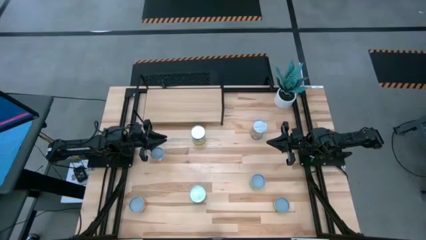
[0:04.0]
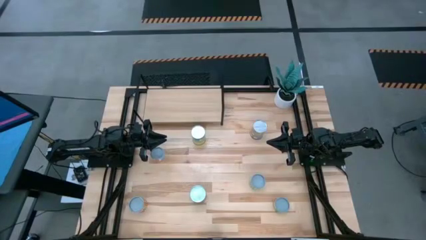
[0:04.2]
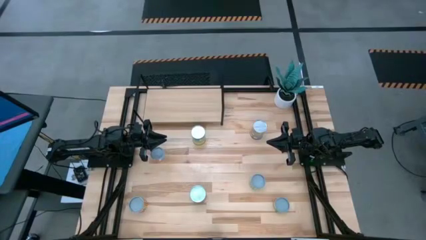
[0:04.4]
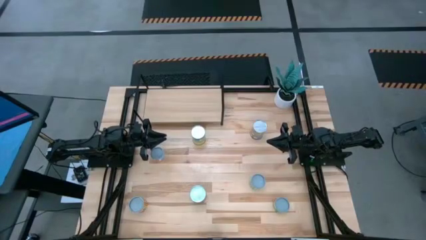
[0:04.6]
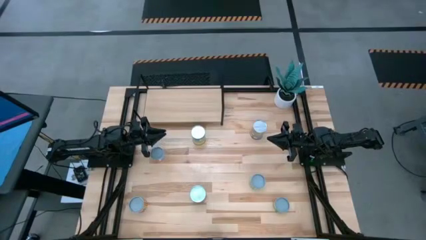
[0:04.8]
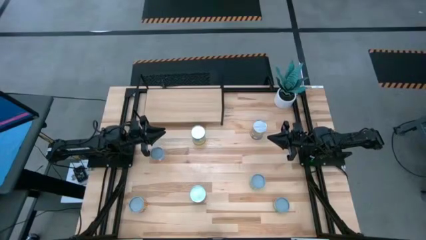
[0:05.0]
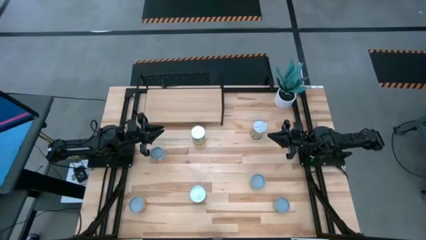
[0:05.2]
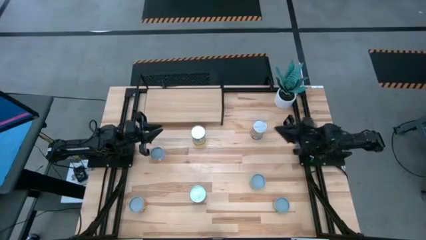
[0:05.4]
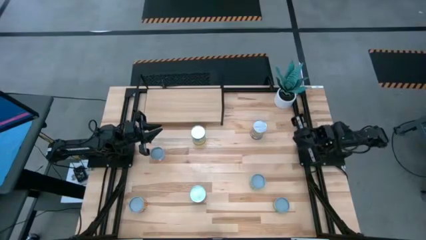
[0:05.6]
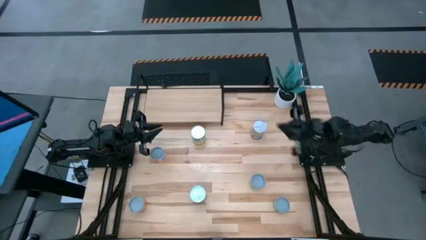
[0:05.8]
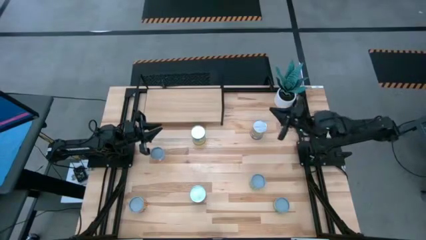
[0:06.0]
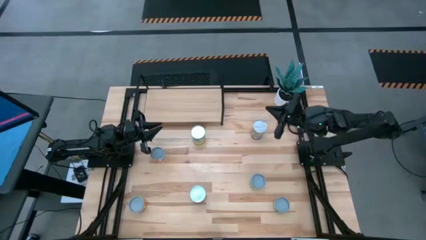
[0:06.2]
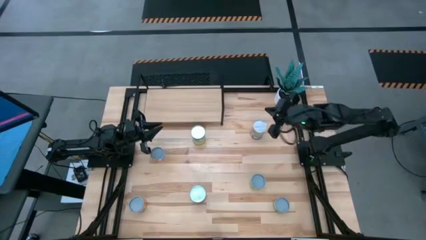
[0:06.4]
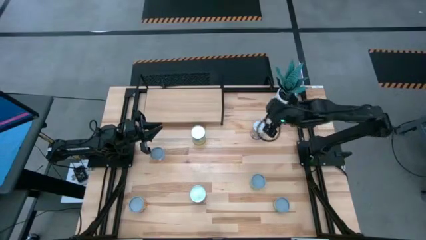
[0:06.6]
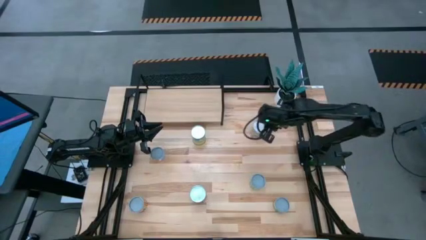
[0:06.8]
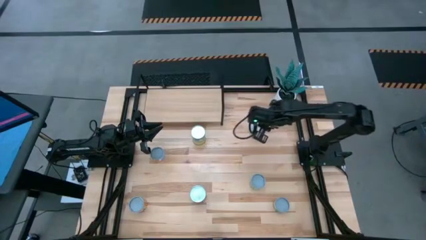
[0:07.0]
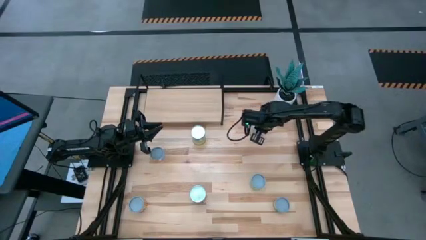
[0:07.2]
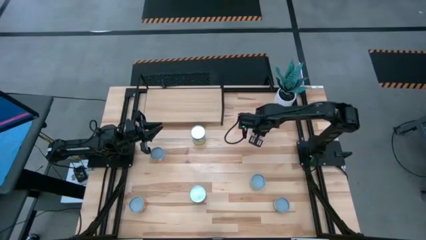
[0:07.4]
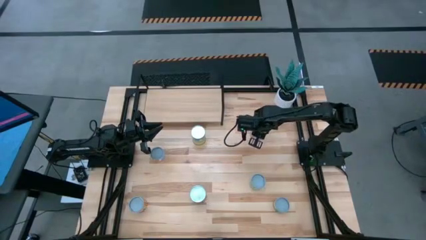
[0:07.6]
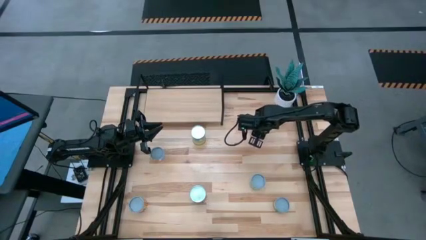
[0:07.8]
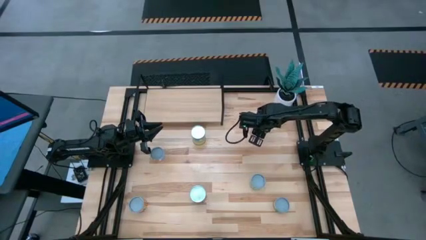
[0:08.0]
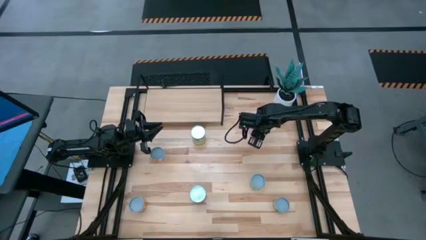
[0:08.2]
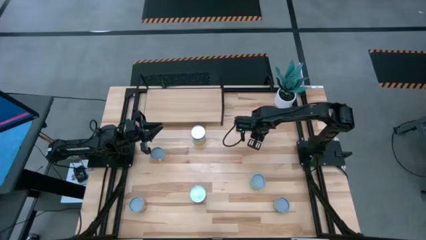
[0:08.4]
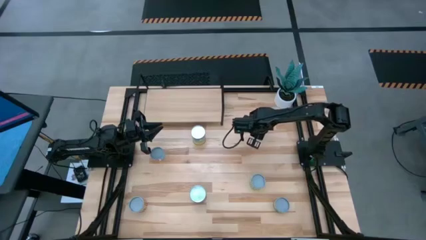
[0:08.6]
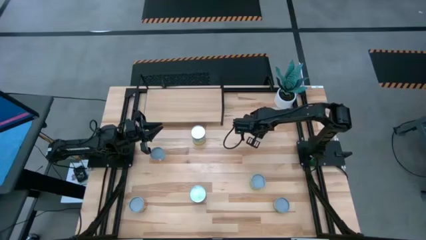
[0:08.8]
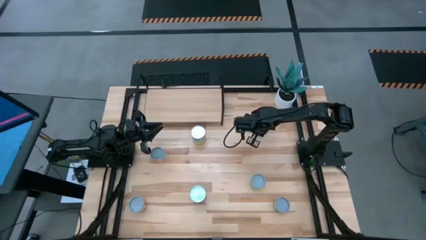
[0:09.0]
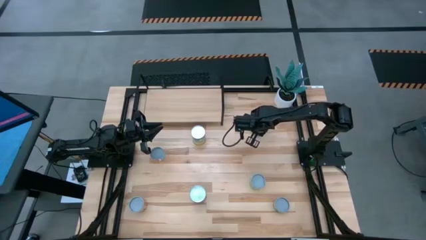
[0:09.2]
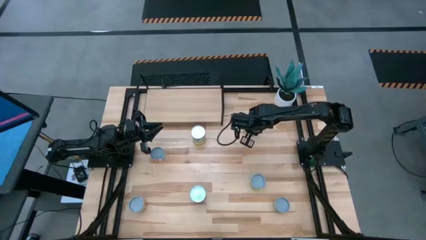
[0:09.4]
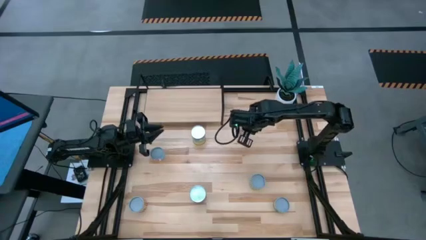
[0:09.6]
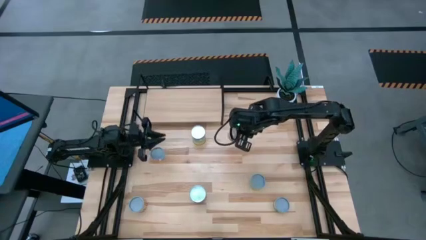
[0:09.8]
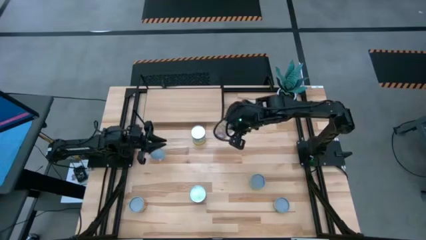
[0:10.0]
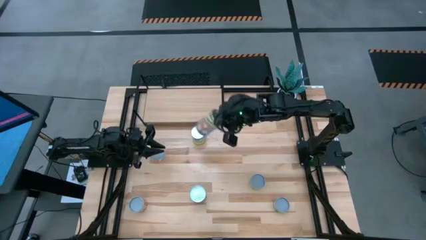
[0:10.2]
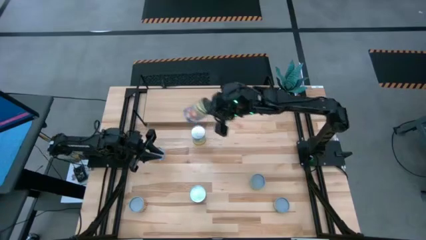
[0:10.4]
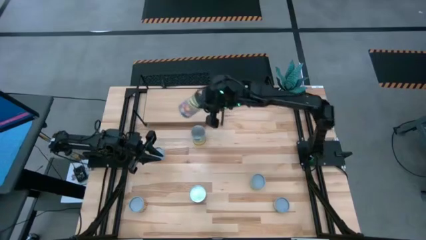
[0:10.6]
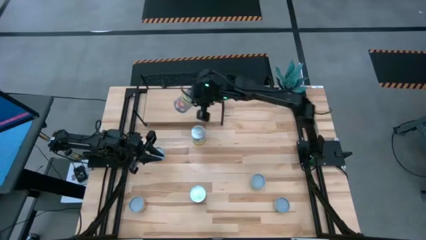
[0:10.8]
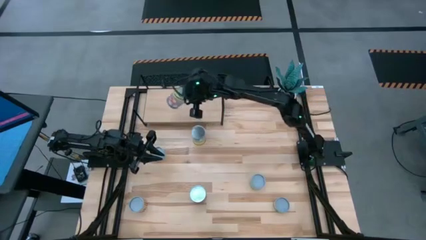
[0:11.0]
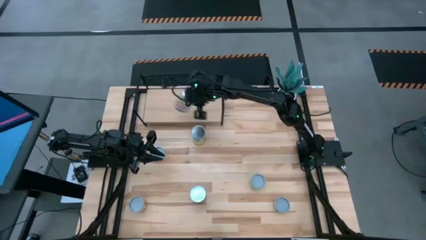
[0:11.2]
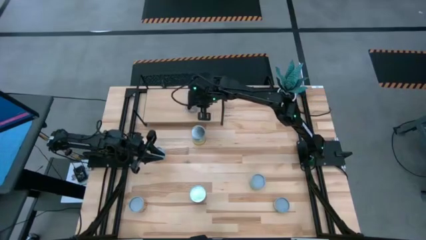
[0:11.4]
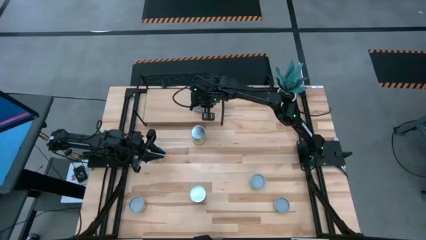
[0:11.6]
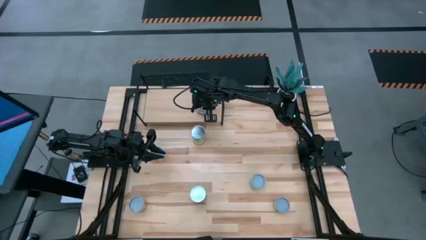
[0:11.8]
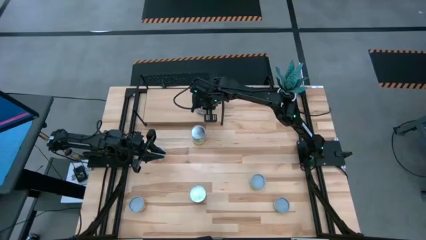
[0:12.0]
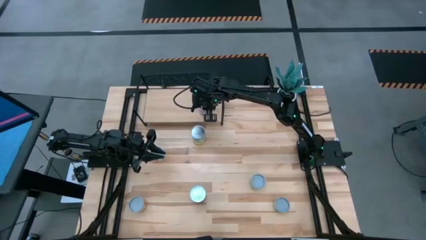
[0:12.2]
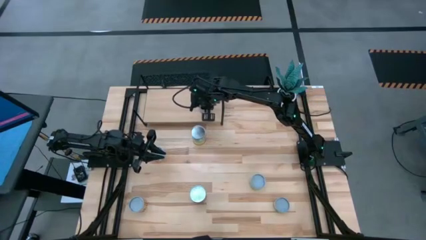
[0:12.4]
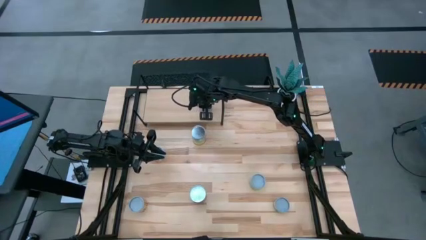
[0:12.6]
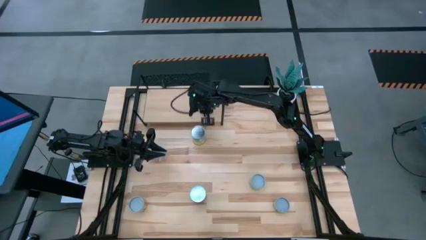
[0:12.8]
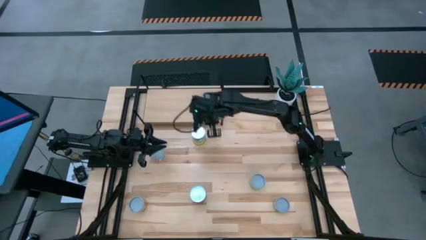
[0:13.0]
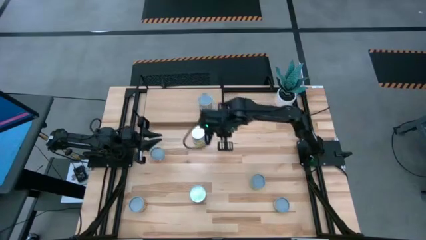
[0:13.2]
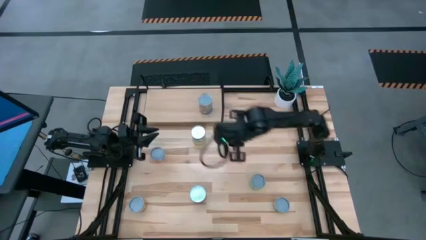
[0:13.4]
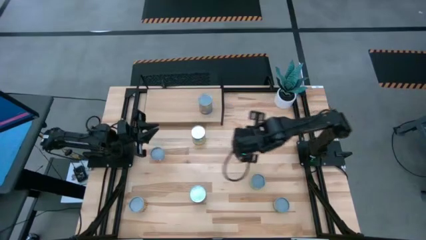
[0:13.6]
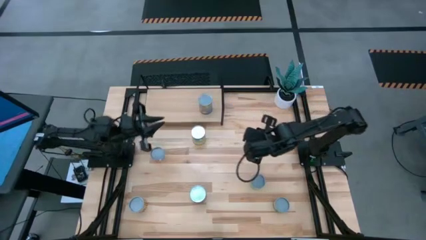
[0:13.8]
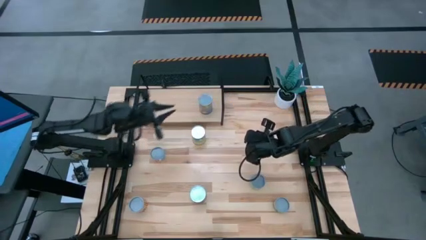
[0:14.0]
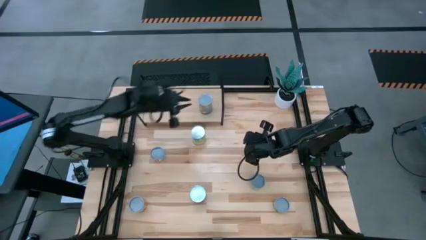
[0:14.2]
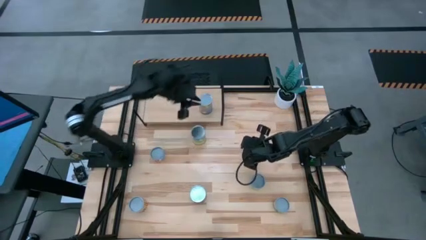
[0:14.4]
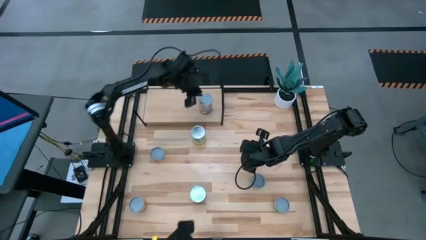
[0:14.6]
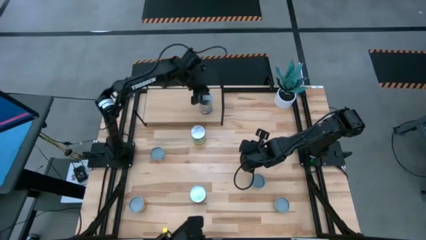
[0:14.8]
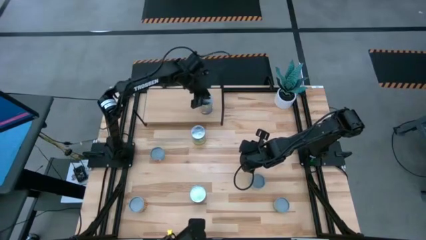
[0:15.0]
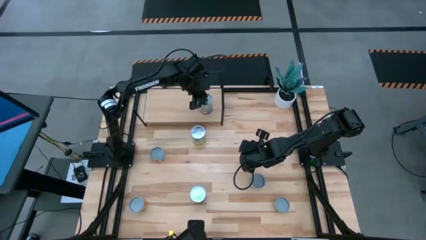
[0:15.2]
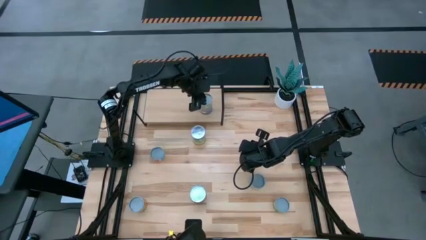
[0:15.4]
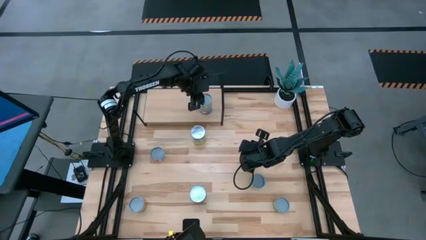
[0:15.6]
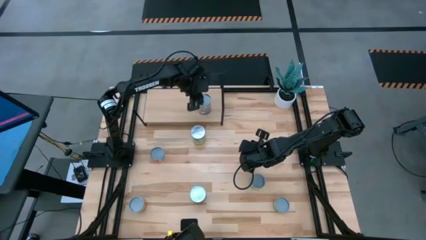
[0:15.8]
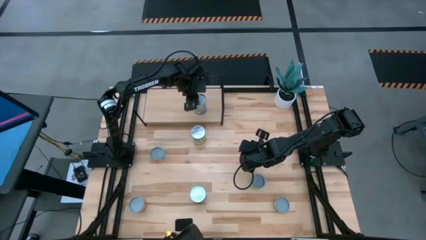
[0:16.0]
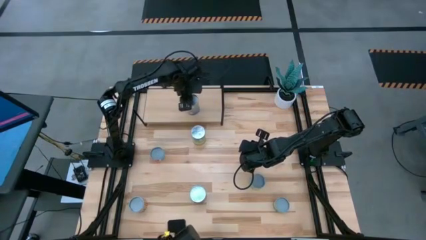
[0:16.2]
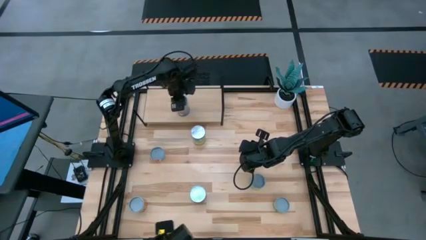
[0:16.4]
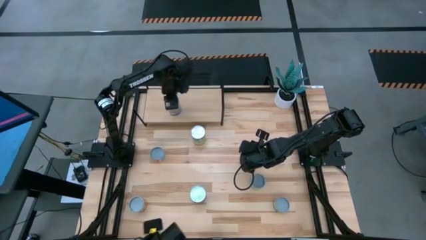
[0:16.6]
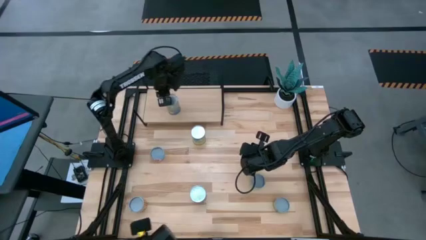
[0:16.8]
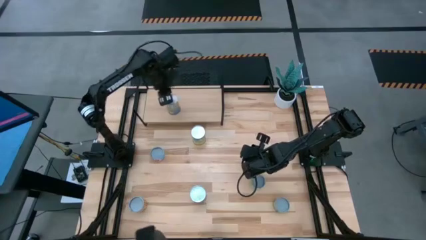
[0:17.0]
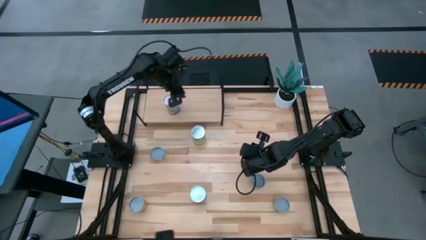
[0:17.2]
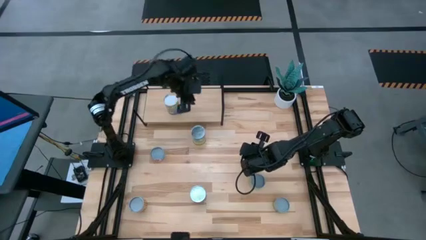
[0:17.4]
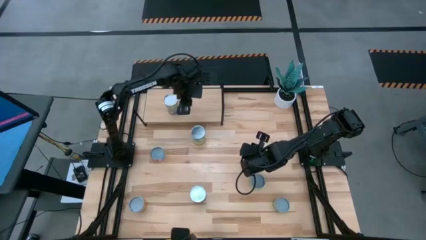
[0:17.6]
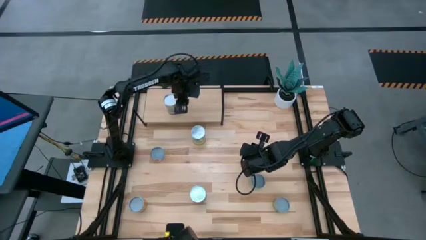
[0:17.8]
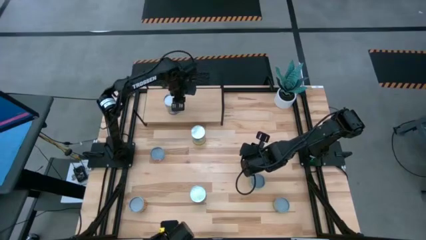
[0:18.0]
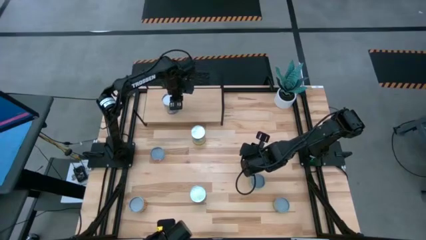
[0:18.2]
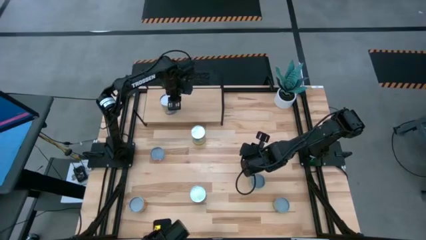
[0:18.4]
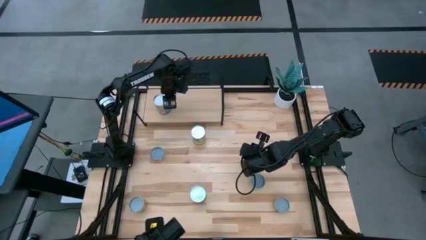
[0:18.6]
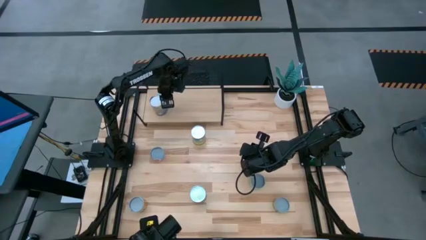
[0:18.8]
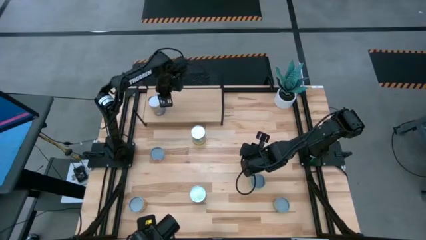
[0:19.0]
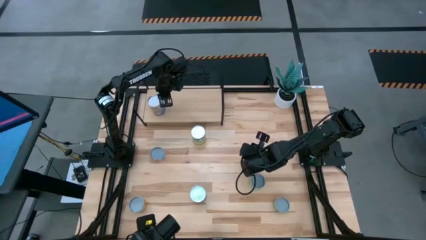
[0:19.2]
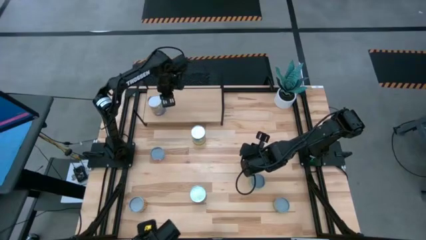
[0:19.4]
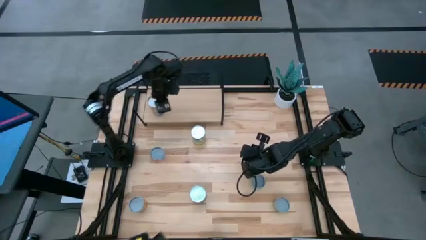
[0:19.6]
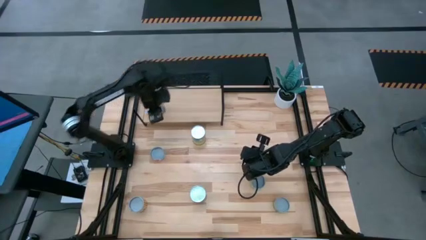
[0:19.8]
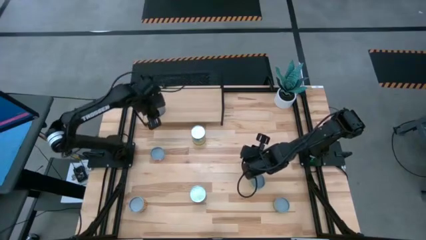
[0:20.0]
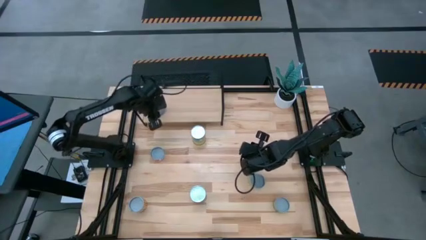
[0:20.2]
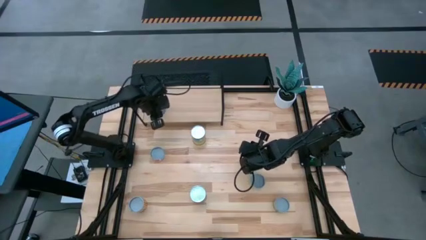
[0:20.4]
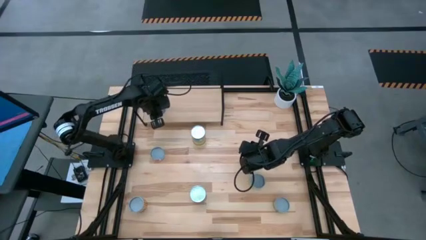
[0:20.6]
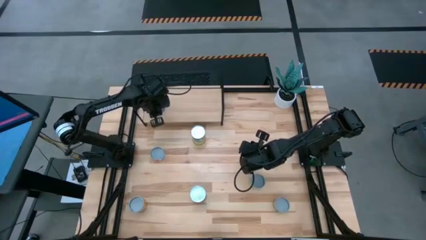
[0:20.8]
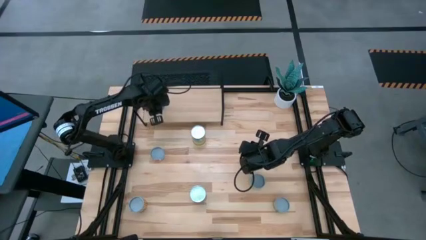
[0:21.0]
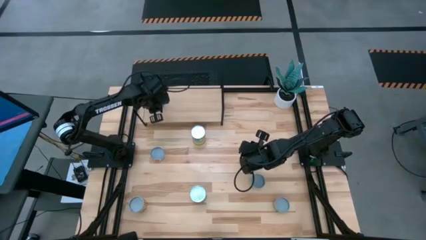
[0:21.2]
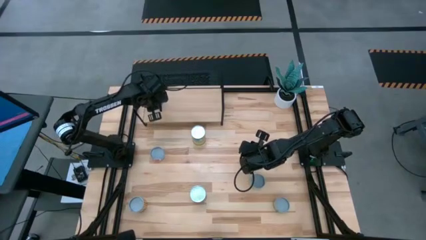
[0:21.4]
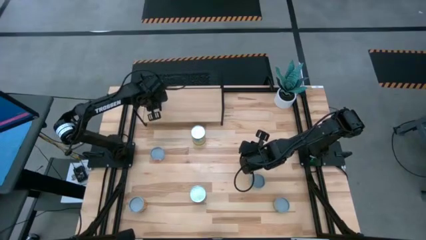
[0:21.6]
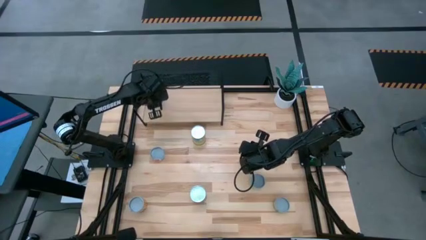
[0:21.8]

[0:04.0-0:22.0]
Task: Pick and place cans onto a shelf
Put the peach can on the shelf
